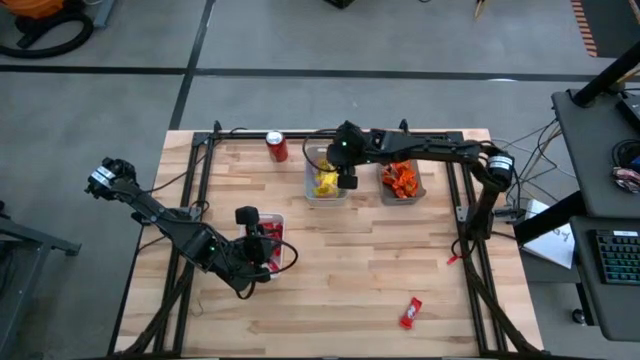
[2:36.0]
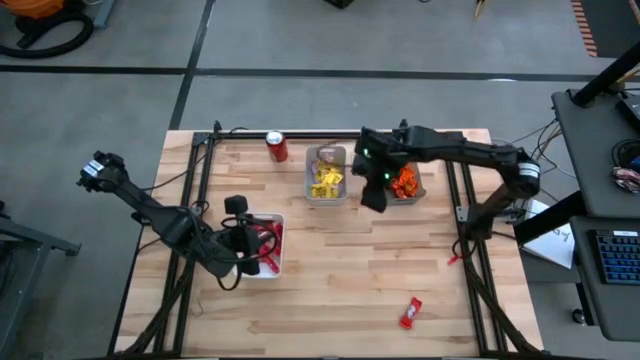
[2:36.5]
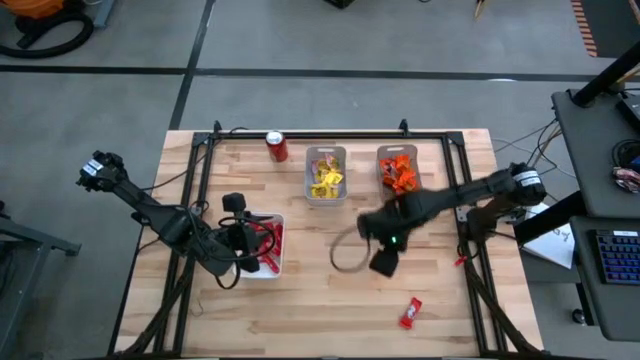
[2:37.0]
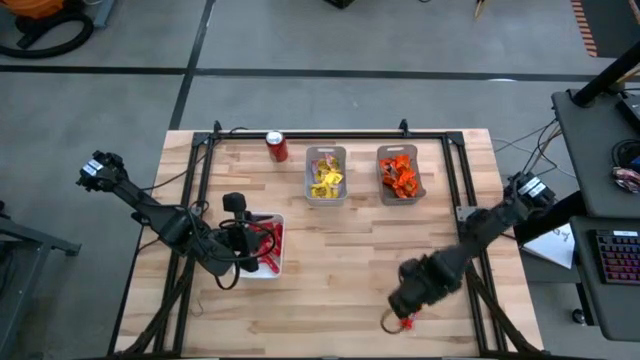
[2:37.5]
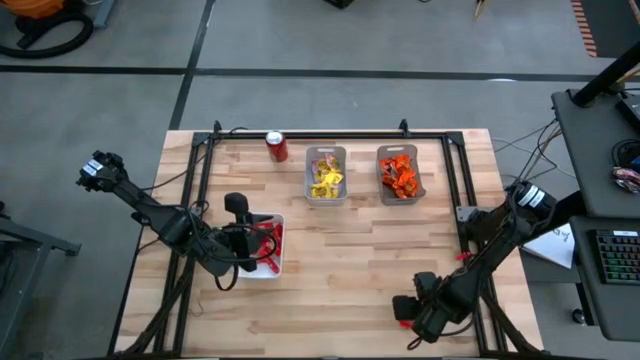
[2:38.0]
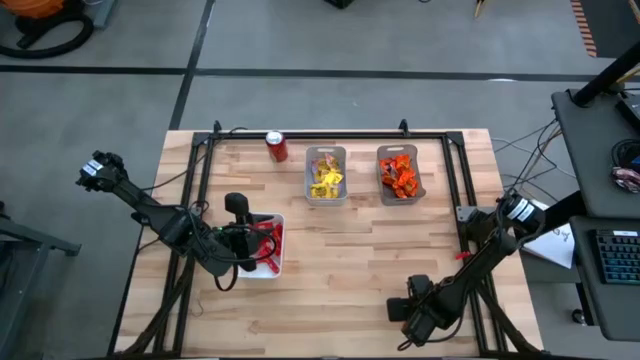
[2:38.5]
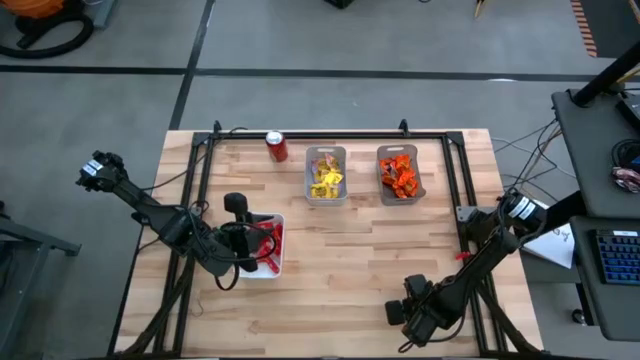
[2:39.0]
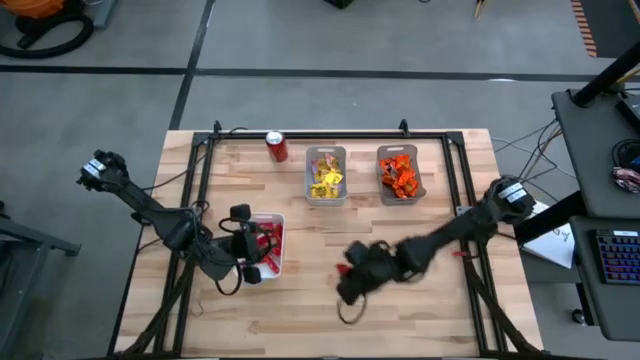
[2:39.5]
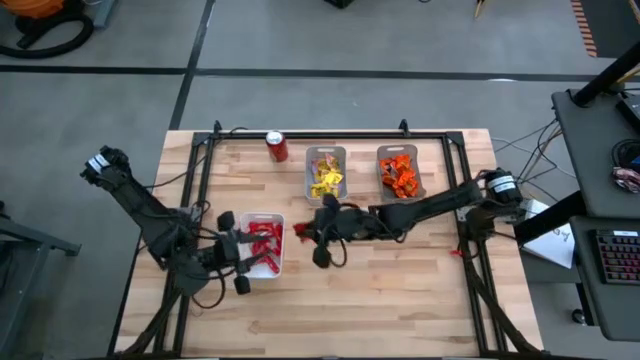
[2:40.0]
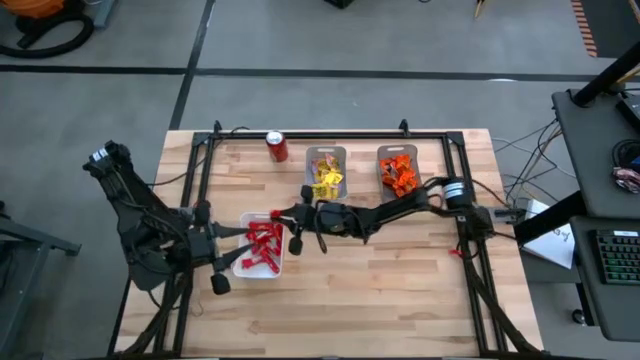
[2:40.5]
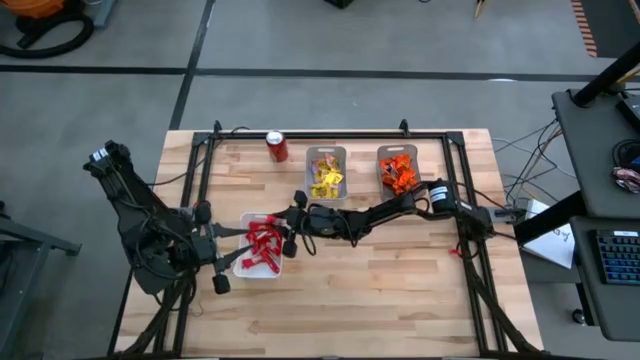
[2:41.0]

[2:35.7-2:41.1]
Task: Sort candy
Put the red candy into the white bin

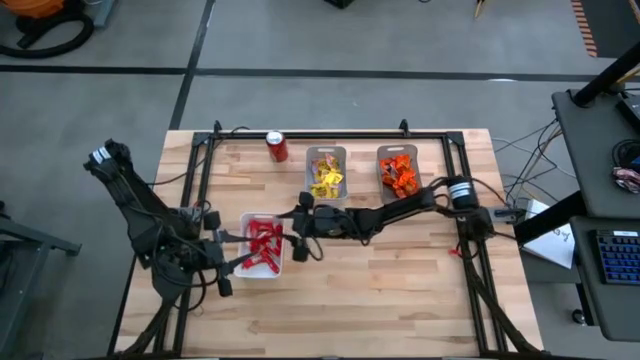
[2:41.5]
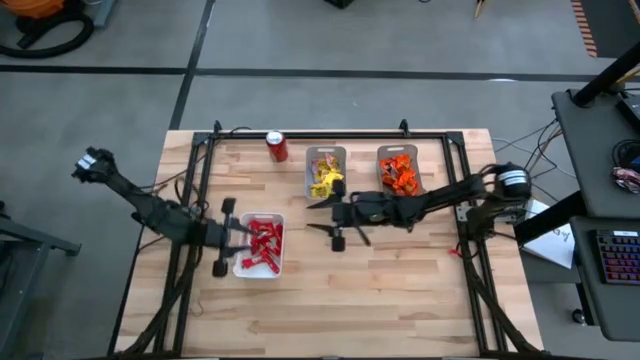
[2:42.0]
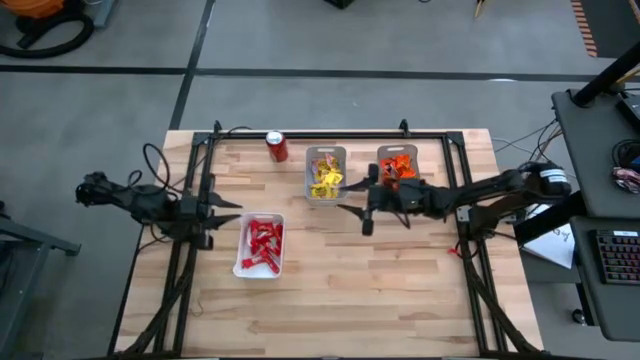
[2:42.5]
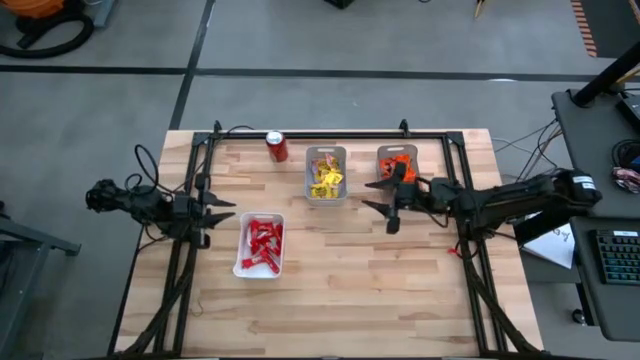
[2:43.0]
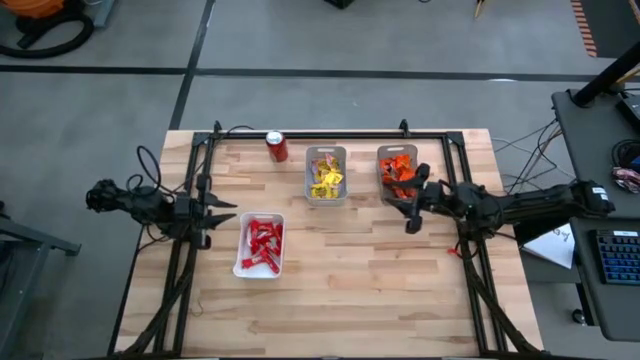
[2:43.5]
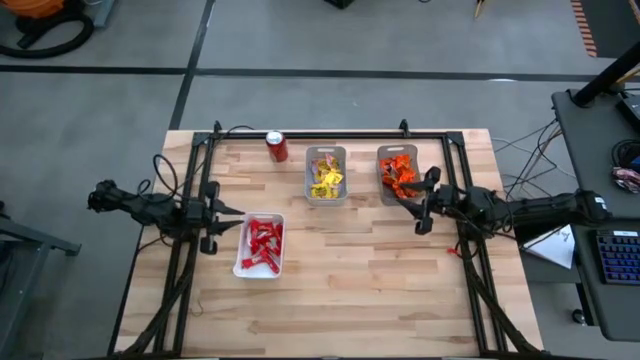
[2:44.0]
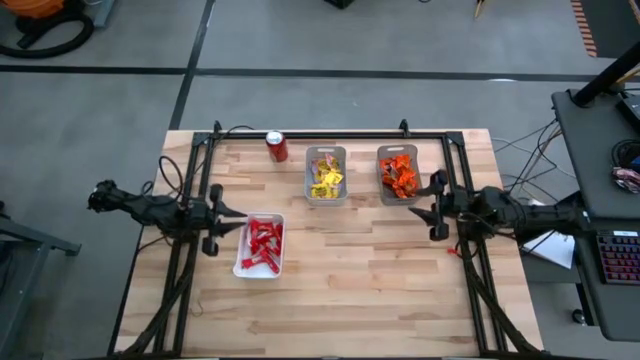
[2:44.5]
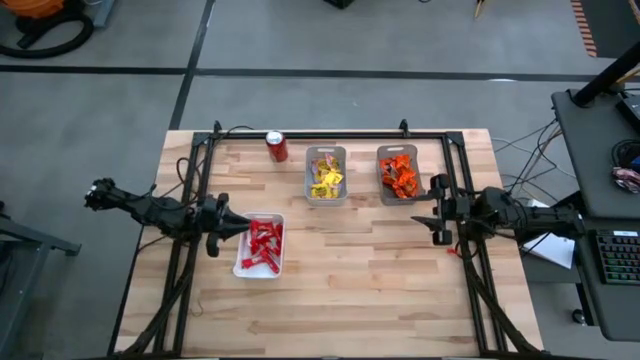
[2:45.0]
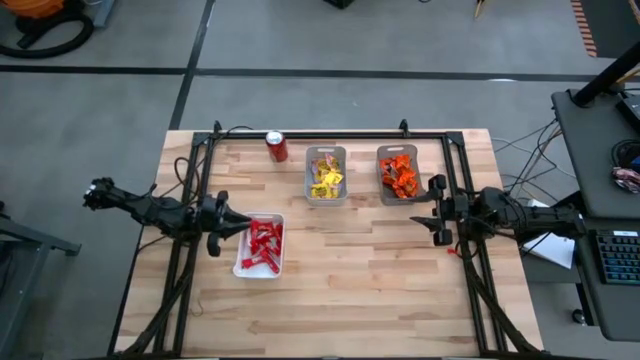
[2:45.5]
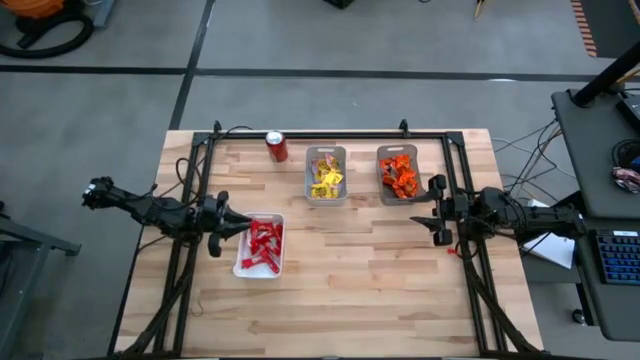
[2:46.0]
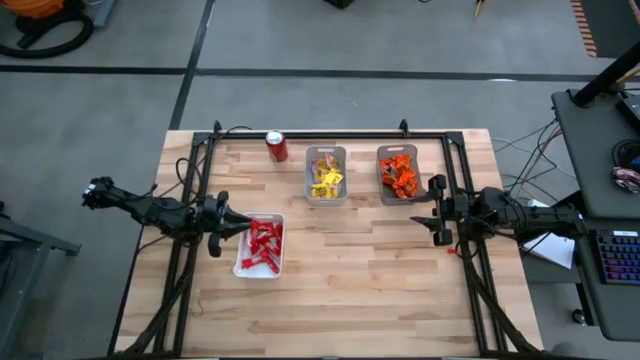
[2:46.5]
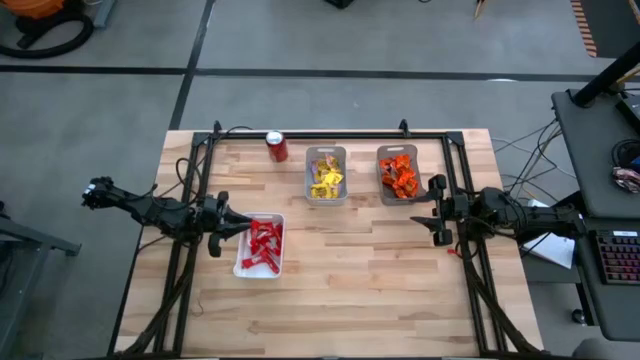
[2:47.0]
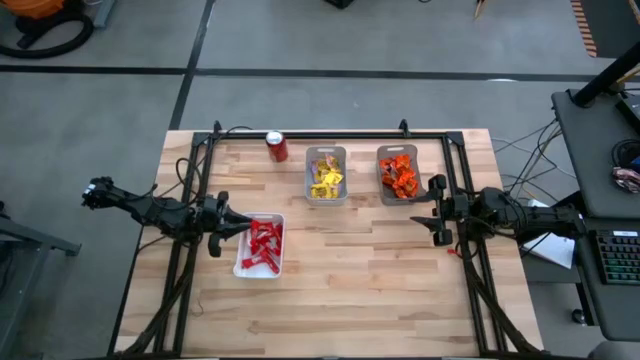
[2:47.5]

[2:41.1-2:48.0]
Return to Home Position
